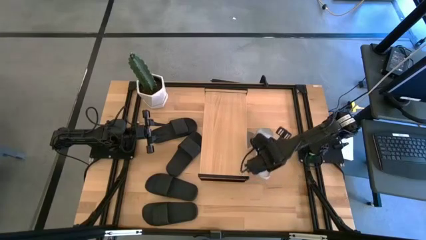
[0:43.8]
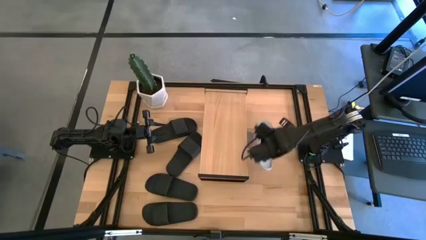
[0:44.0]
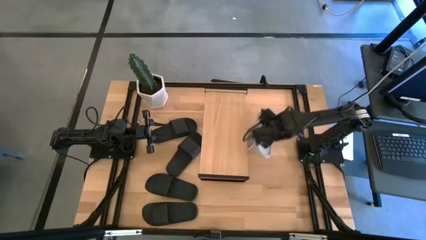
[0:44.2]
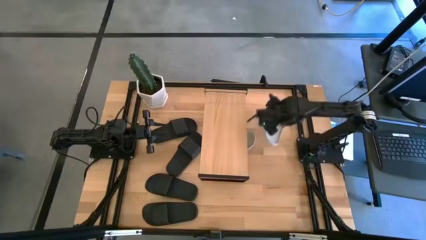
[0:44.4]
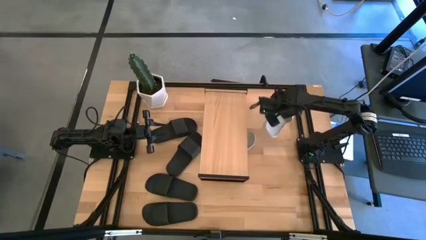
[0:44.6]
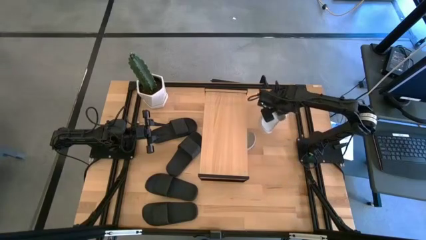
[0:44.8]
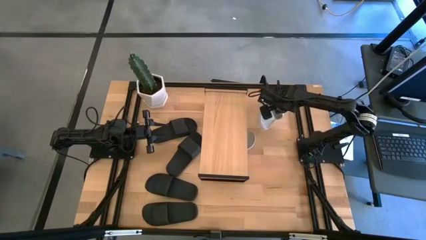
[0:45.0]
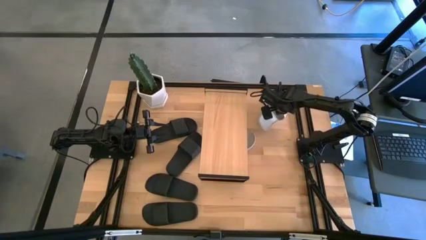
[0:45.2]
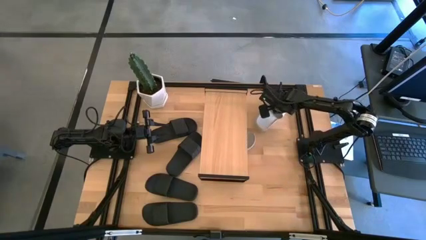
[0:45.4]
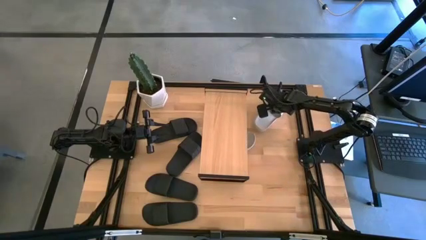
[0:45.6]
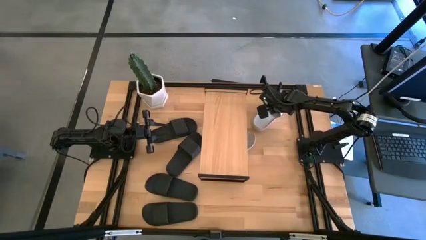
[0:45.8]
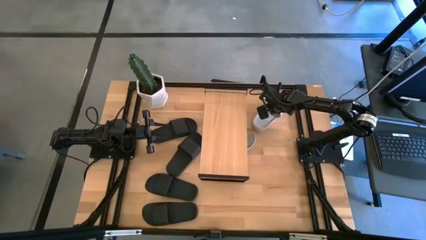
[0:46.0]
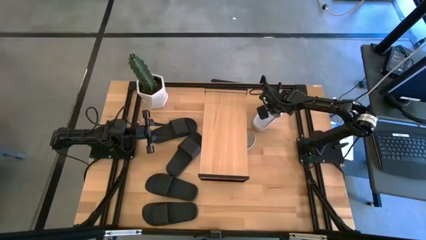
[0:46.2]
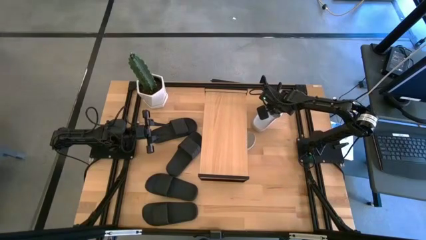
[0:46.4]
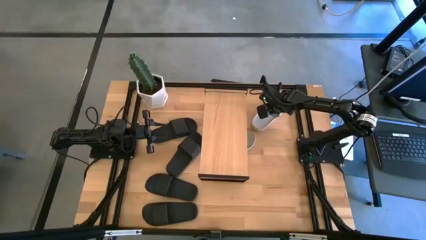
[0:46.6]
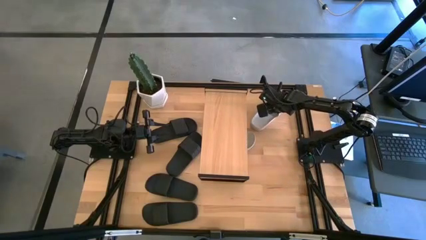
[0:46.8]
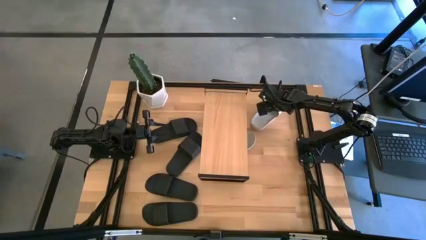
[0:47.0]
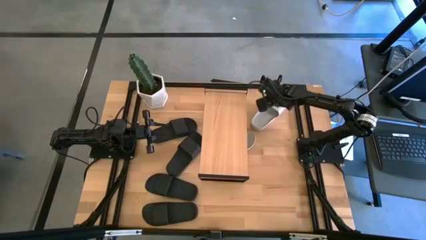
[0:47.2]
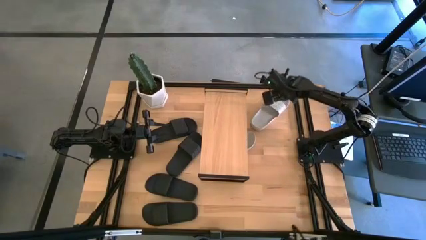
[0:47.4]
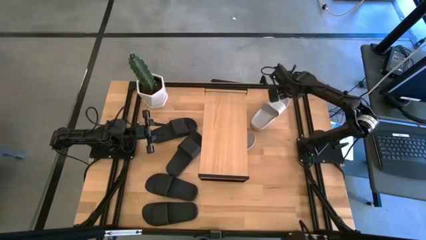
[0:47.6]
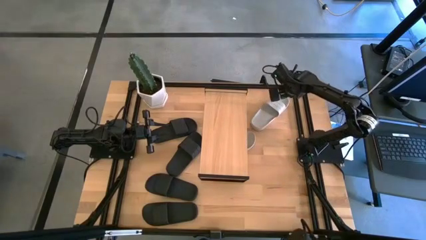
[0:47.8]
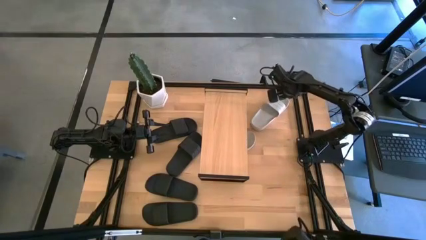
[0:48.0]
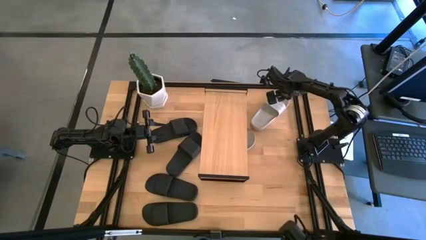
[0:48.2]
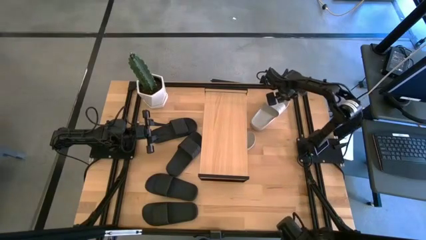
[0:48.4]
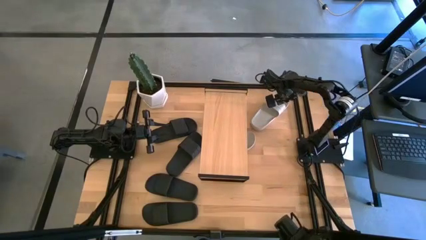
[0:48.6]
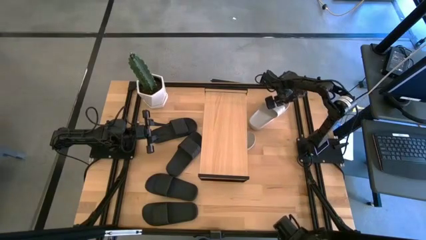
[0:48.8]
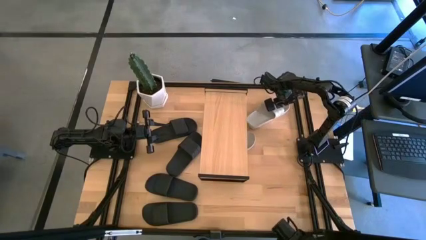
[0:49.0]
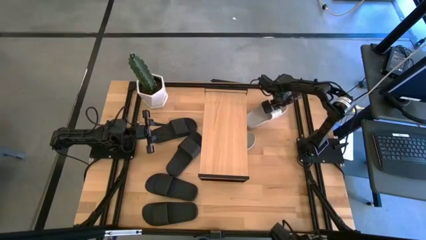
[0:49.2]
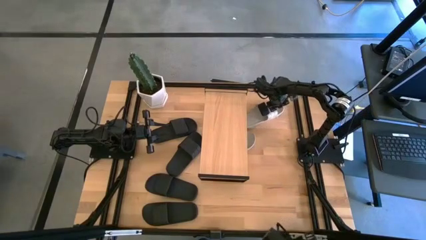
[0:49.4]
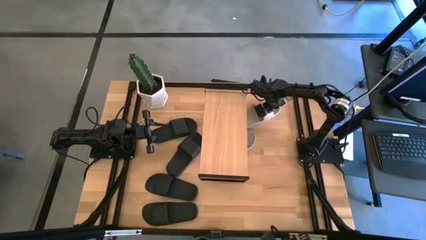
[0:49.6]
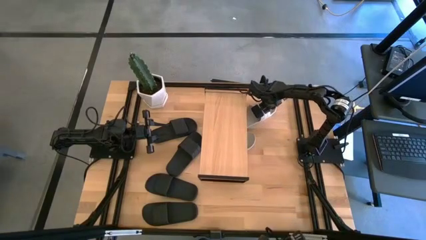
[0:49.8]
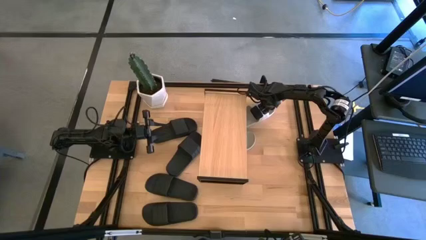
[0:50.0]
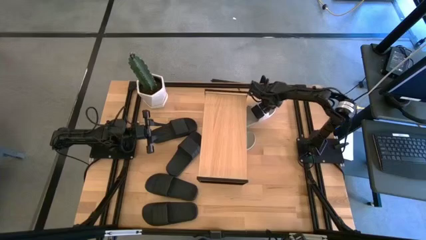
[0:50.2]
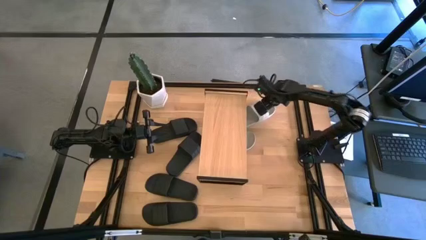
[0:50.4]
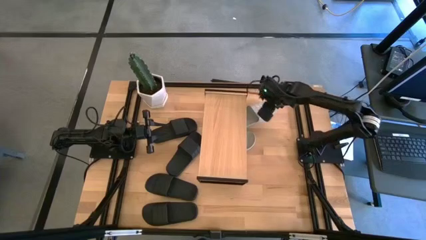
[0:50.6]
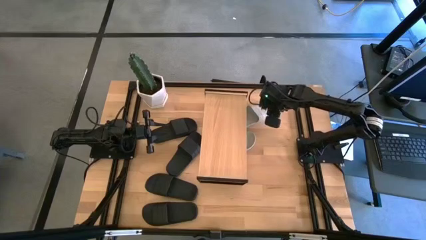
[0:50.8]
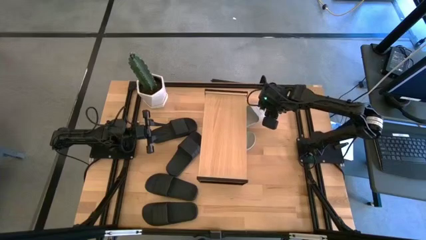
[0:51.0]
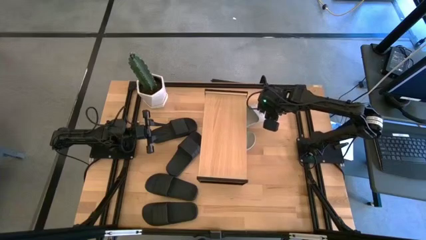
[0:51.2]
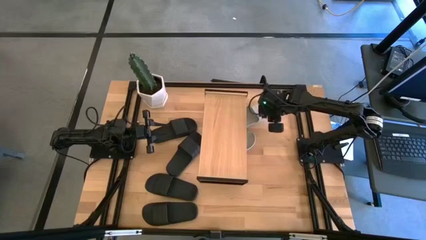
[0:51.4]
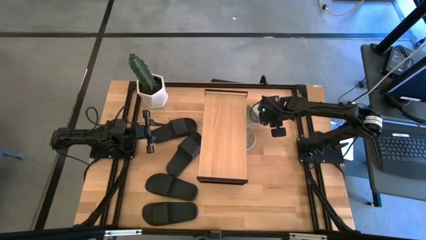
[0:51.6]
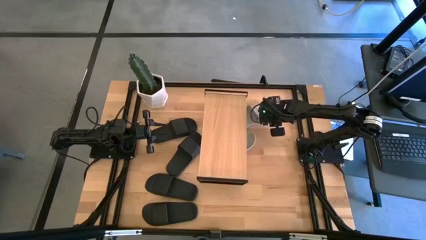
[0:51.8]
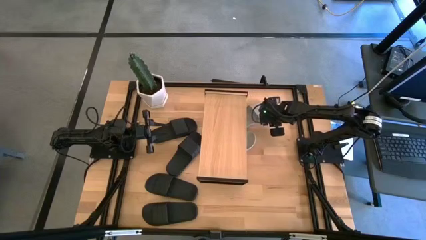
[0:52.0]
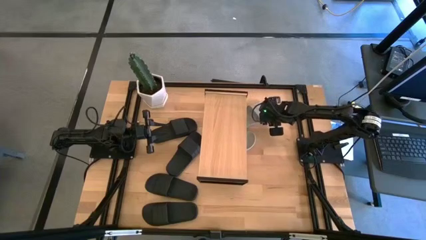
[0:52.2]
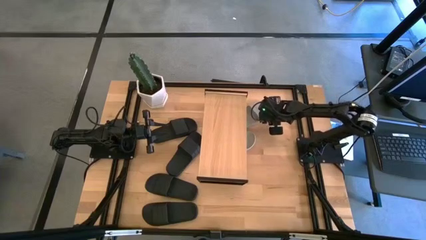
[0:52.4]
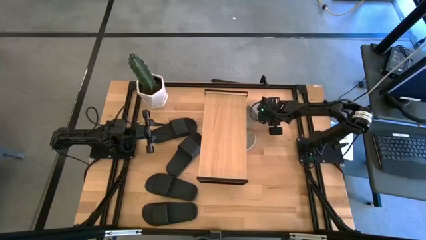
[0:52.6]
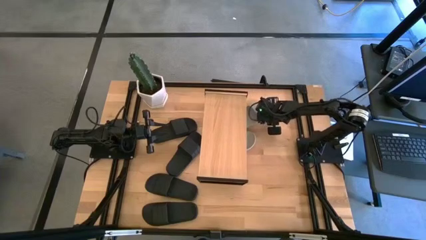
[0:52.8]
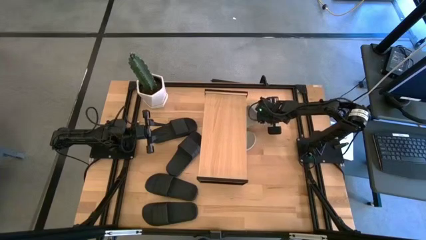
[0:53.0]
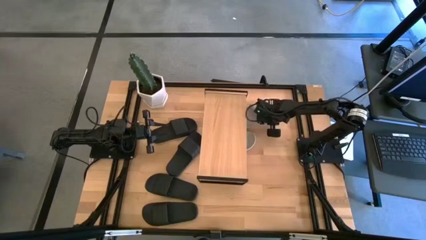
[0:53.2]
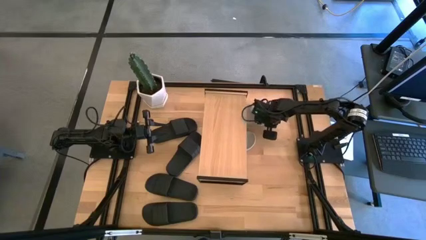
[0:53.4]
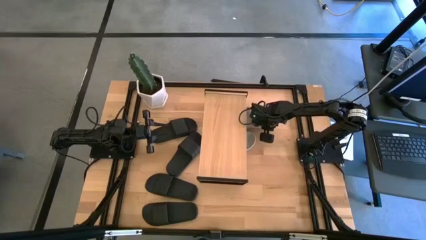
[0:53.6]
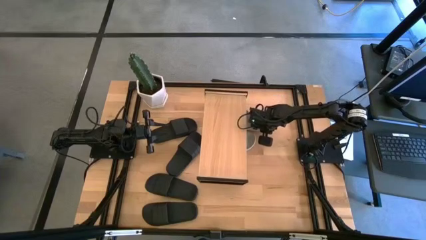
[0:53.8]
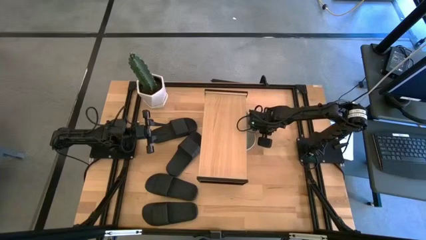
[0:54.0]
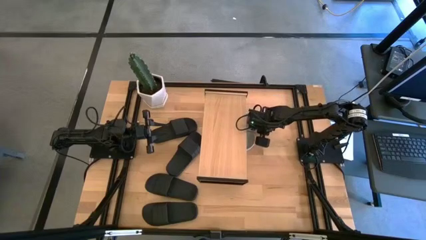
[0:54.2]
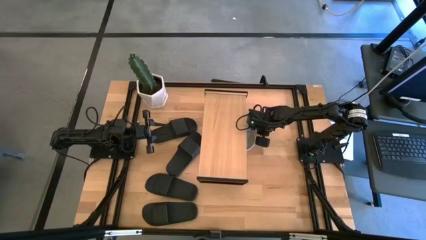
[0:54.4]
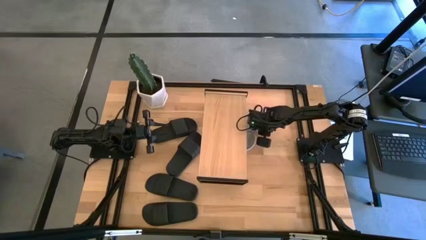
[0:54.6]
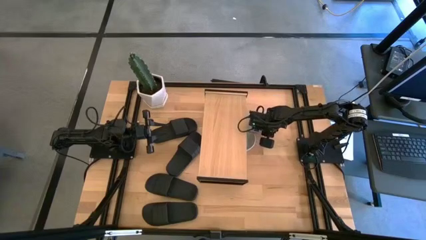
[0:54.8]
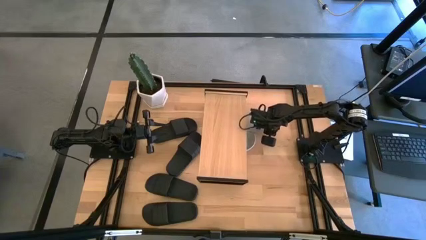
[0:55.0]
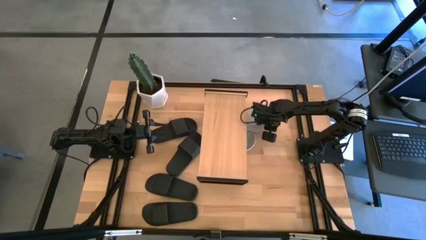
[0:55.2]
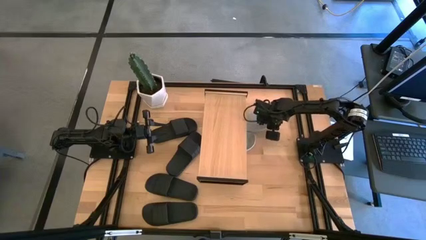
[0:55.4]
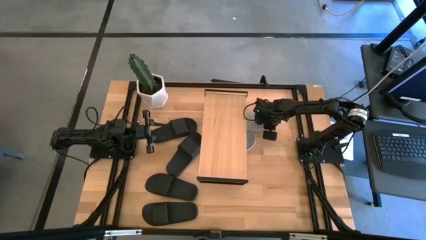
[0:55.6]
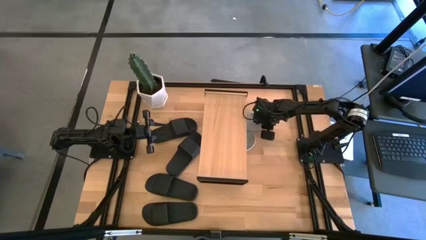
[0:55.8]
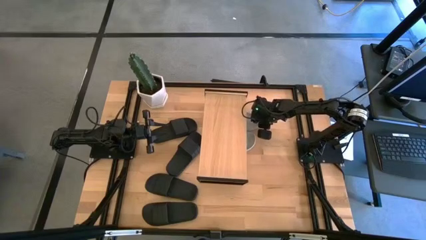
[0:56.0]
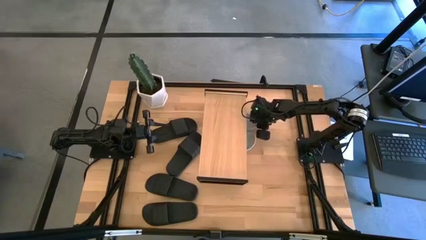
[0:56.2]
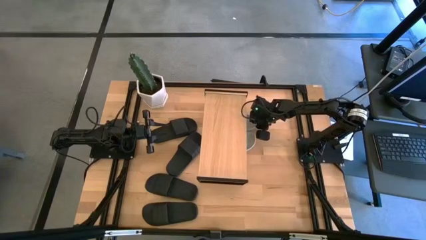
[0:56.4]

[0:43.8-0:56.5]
Task: Pick and place slides into the shelf
Put the gray slipper under the shelf

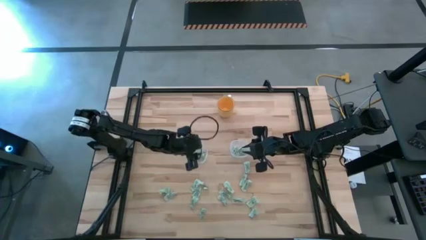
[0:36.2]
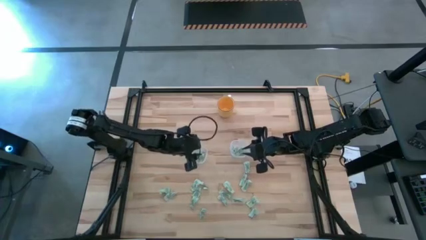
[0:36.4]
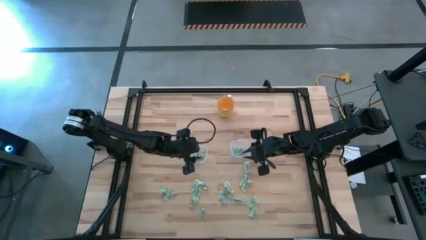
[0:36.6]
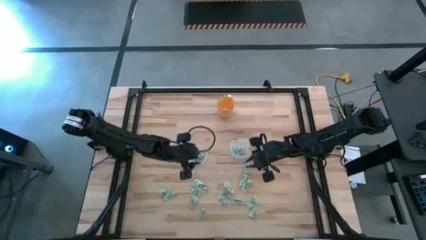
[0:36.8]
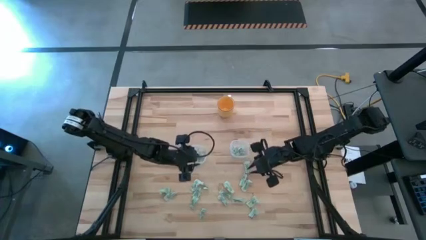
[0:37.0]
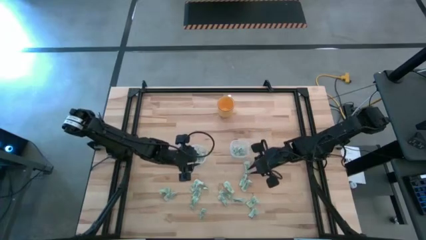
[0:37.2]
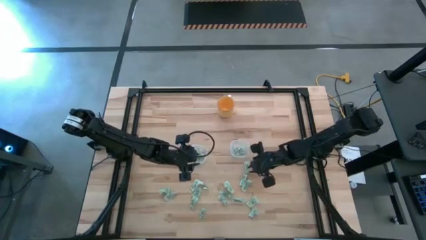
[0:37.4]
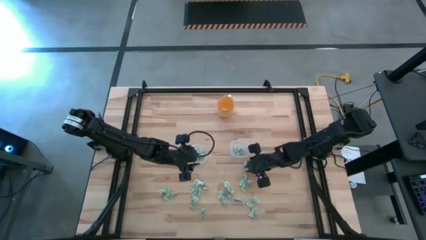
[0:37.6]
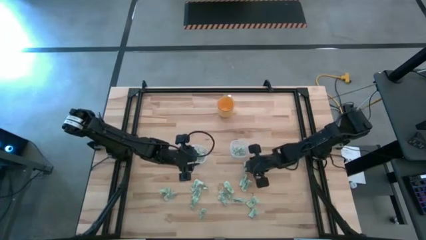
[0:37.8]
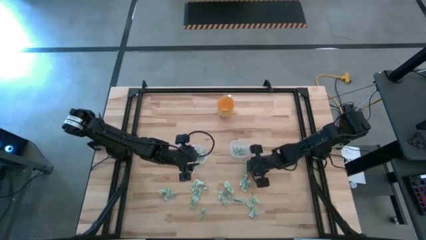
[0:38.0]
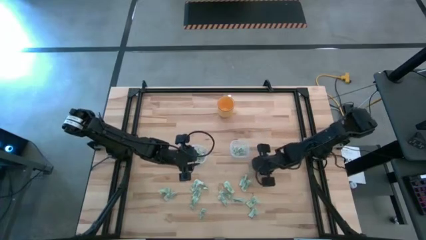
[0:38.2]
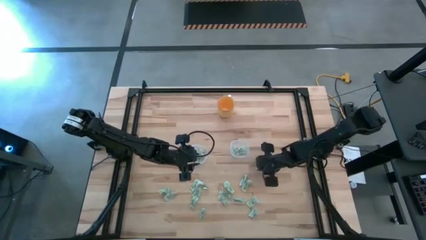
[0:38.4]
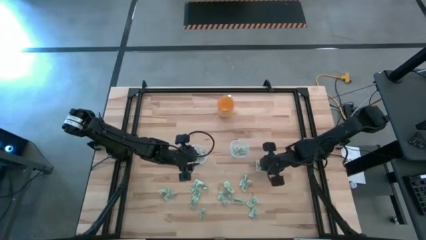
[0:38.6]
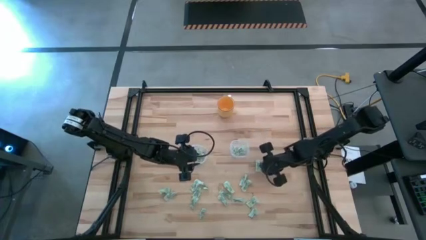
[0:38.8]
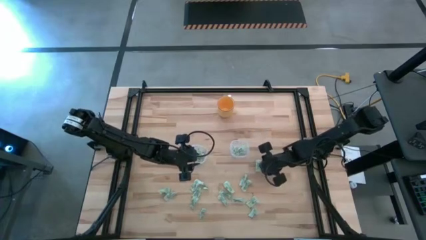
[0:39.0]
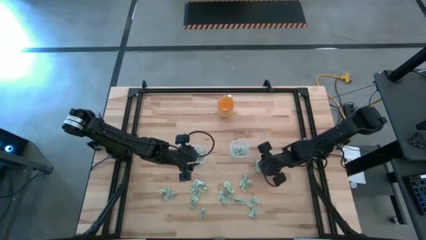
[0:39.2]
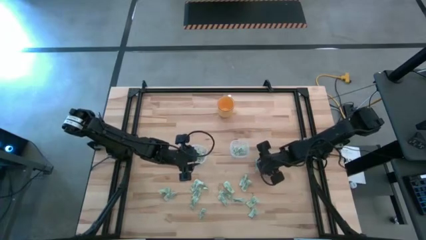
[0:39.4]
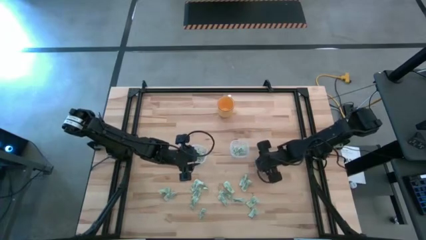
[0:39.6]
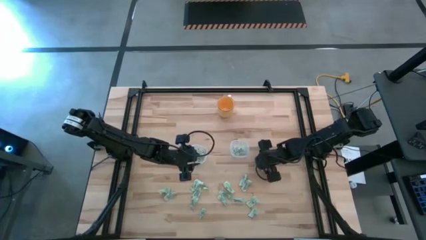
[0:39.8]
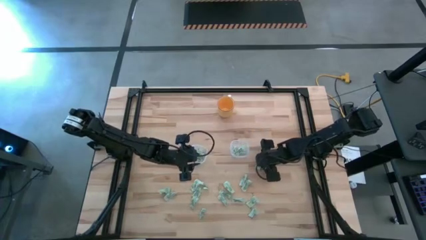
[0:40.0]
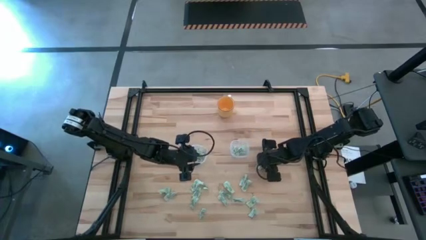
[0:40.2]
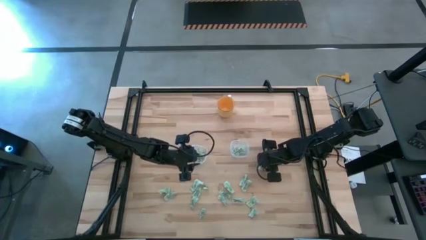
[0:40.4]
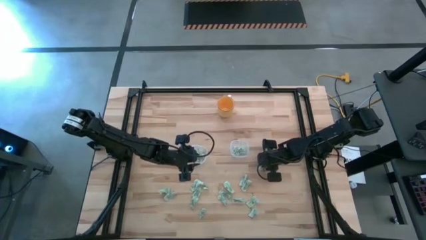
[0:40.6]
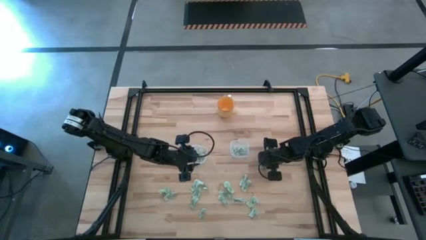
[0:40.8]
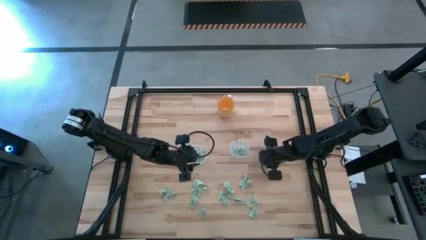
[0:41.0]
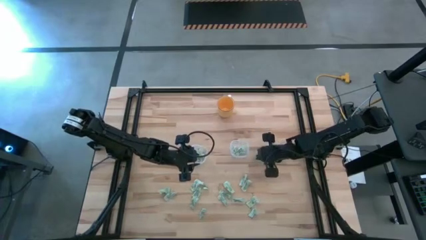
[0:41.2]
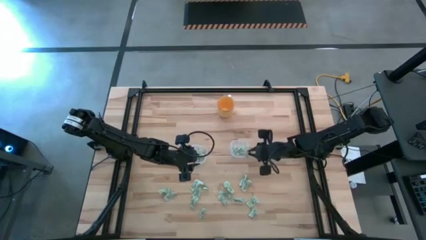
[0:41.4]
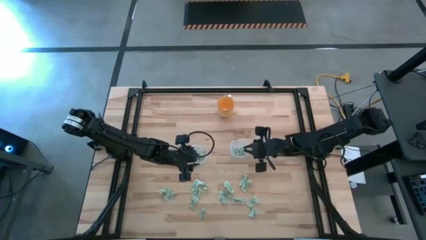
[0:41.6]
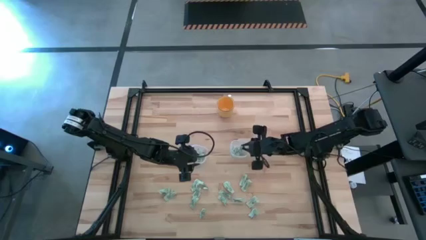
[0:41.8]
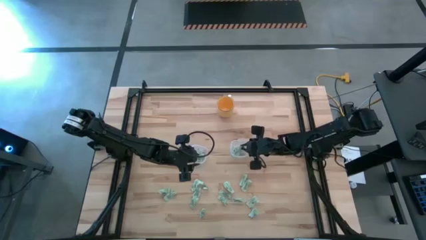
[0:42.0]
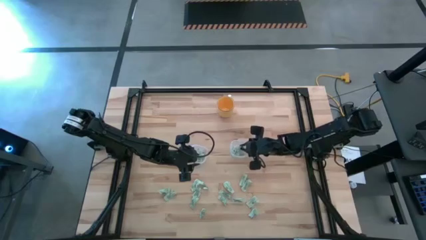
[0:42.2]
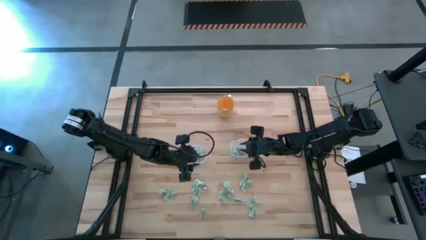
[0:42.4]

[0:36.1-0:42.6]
Task: Pick and place items into bin
Put the green sweetener bag into the right transparent food container
